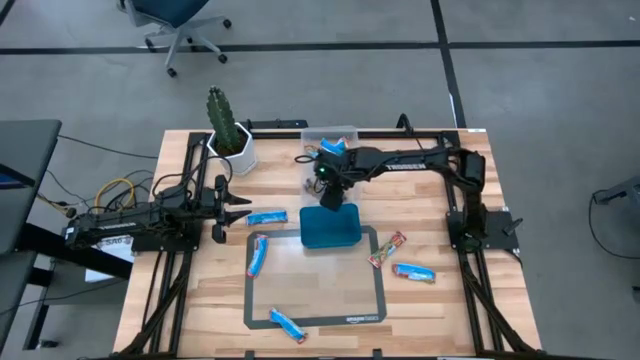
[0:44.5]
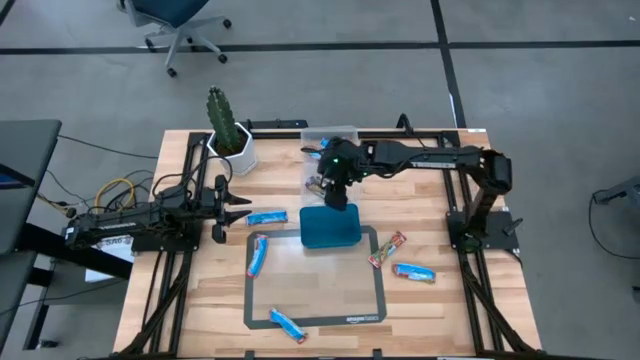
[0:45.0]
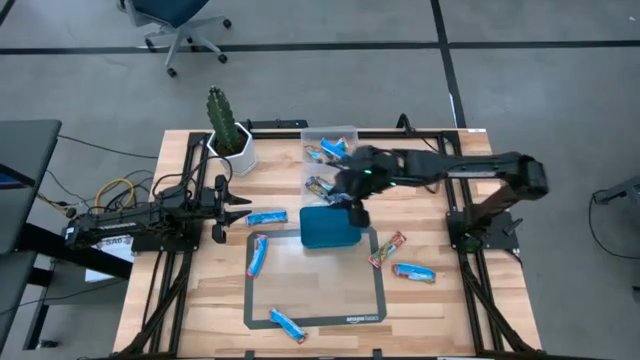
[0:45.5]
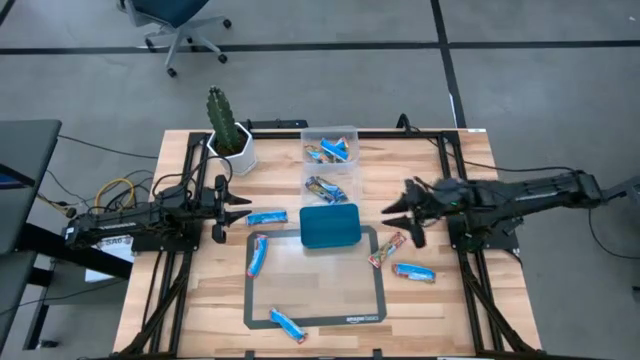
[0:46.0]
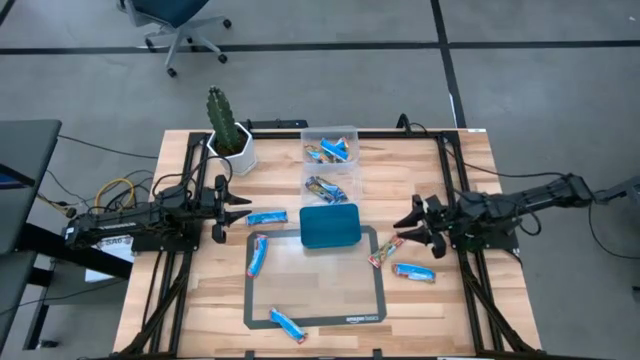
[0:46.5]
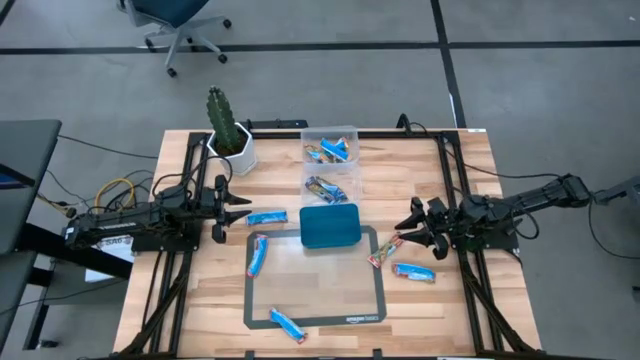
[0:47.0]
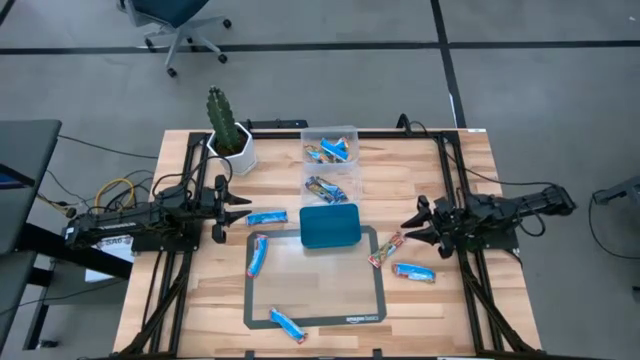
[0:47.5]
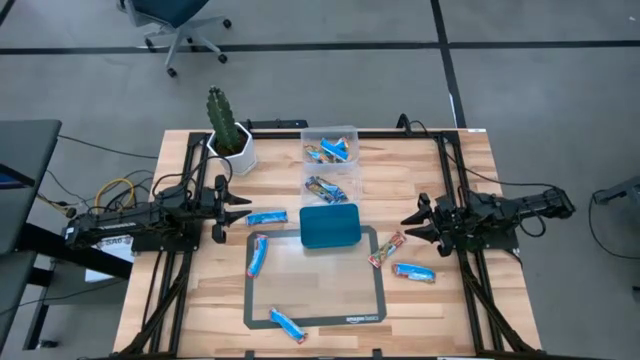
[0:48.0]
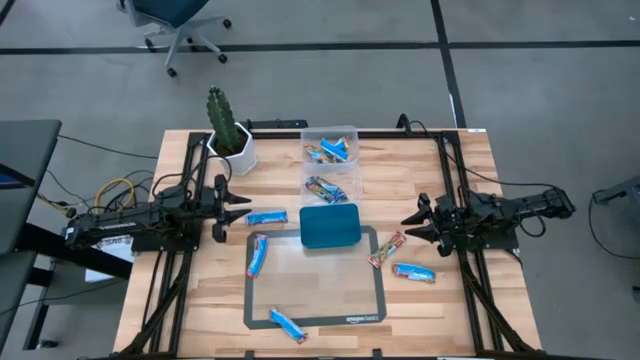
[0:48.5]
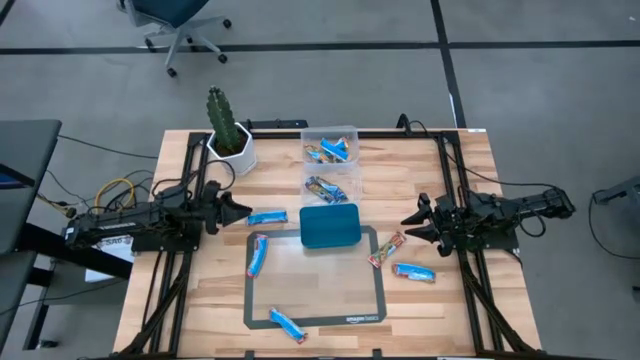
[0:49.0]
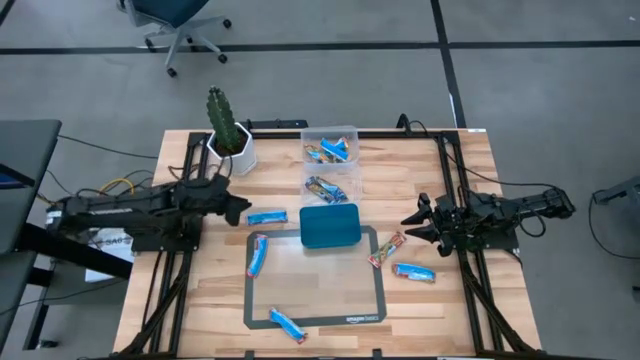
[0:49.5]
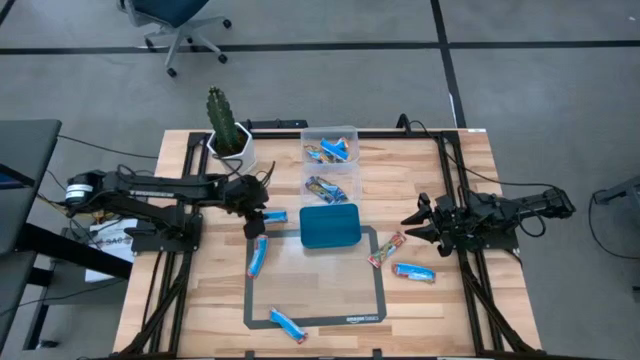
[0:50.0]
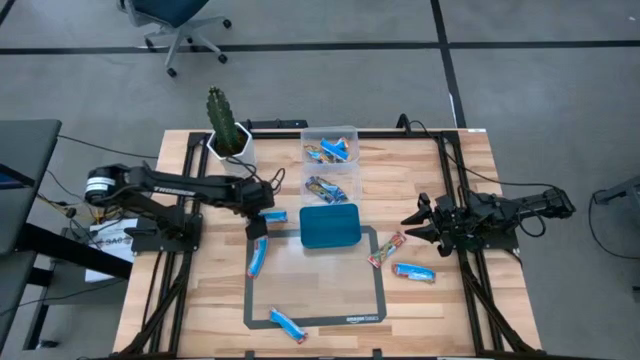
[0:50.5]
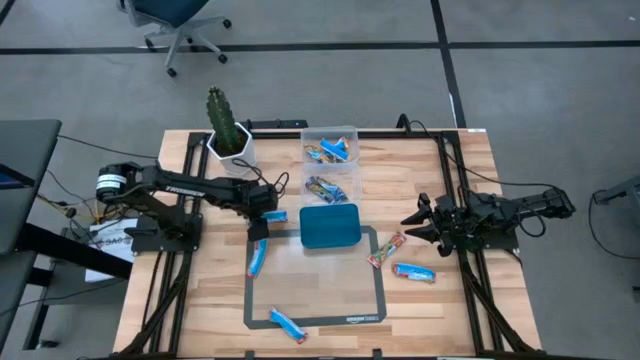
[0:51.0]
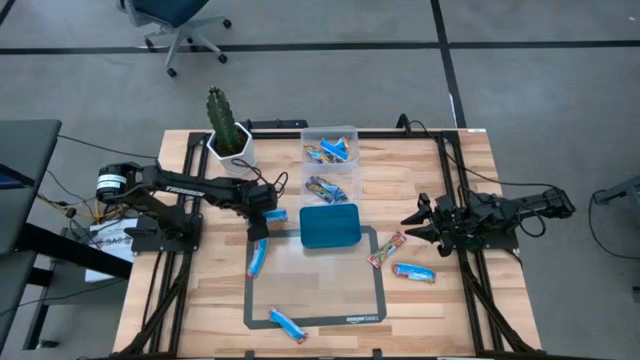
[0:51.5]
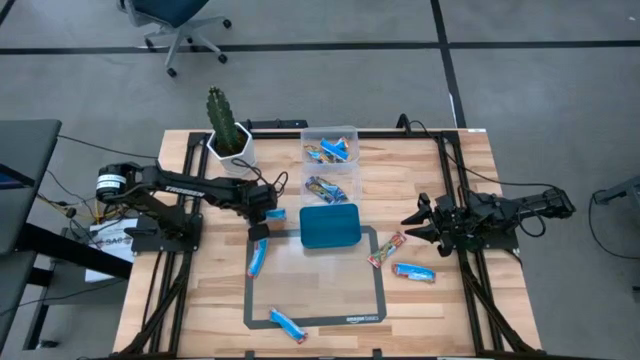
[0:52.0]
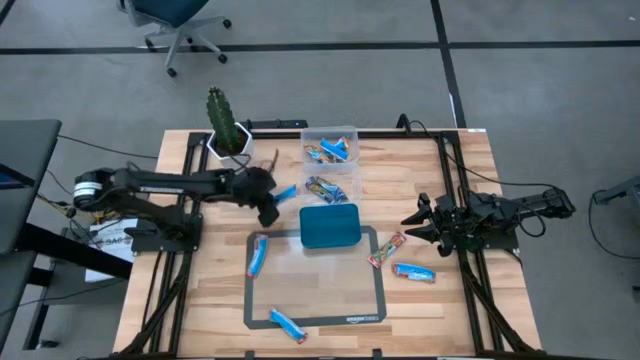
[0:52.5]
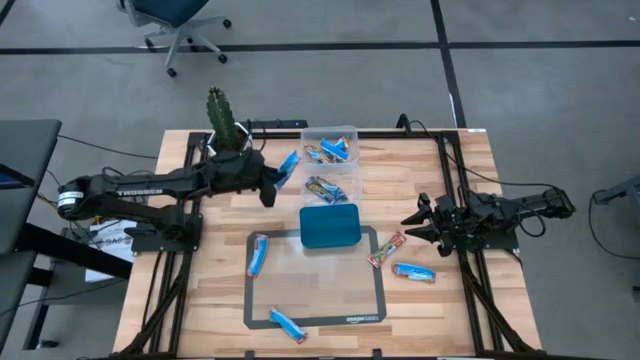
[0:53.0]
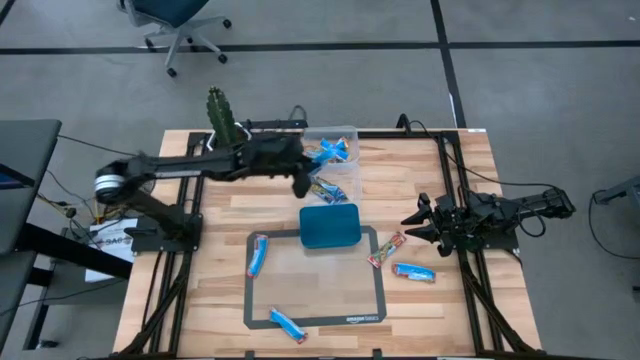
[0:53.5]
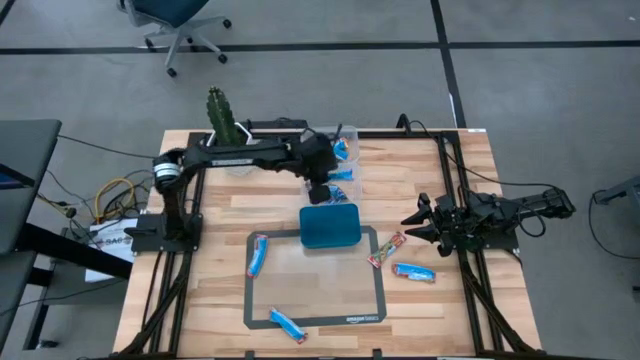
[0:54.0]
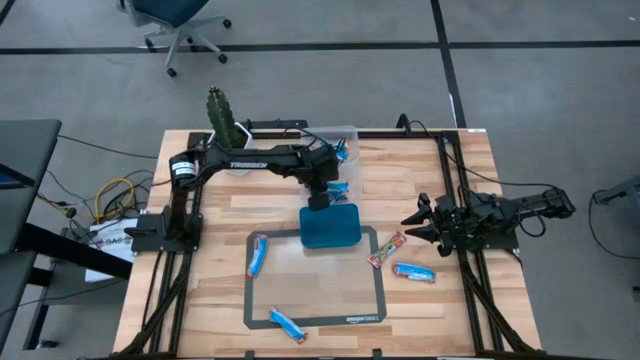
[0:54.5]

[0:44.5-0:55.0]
Task: Pick and place Granola Bars by type
Put the blue granola bar into the bottom transparent bin

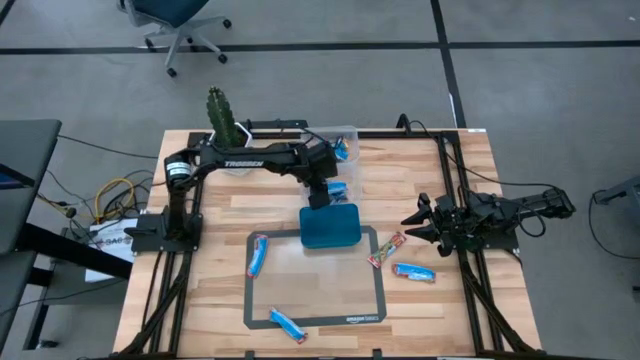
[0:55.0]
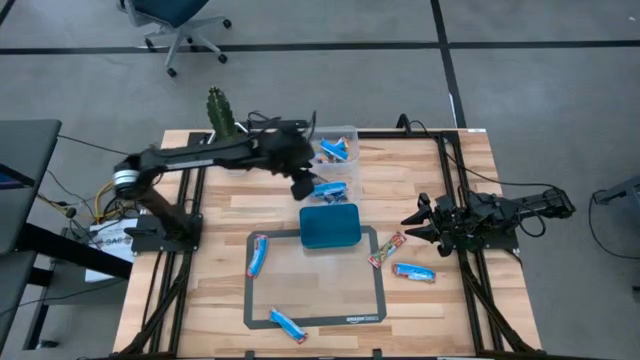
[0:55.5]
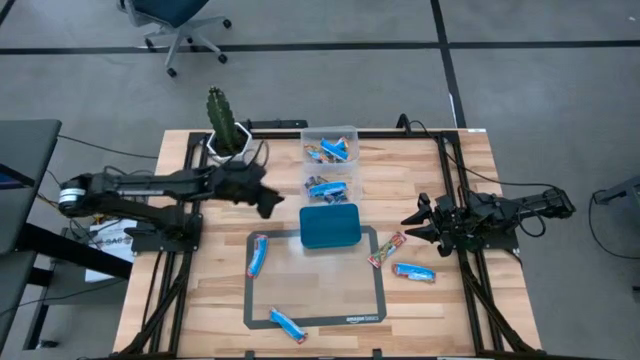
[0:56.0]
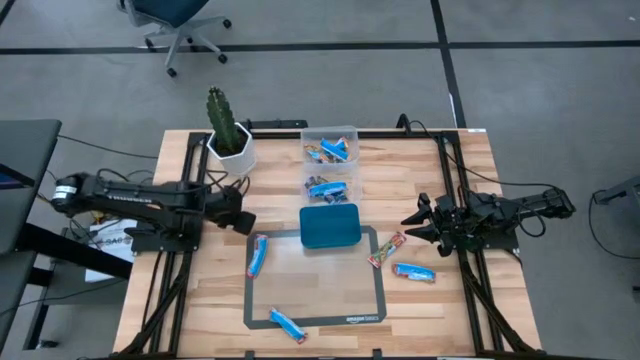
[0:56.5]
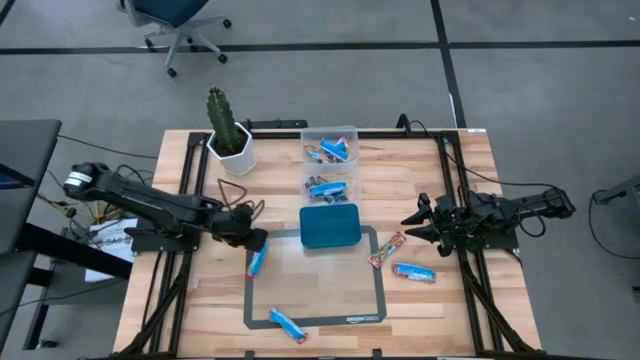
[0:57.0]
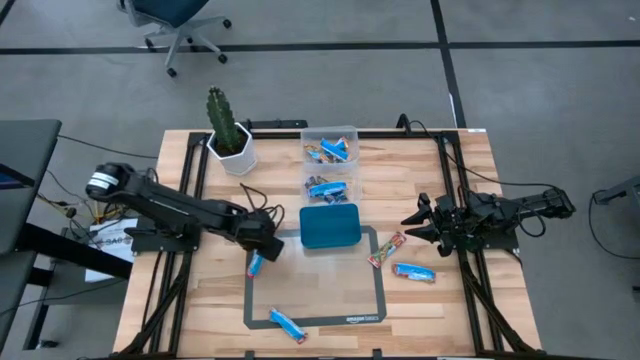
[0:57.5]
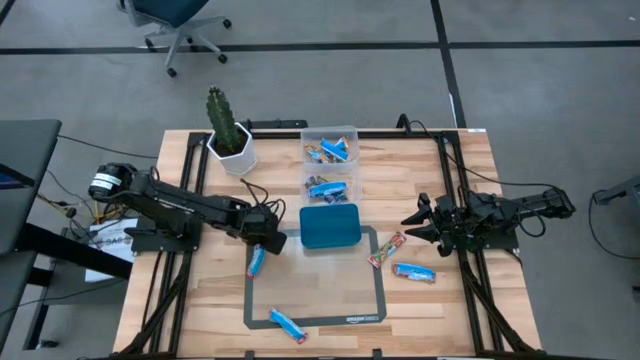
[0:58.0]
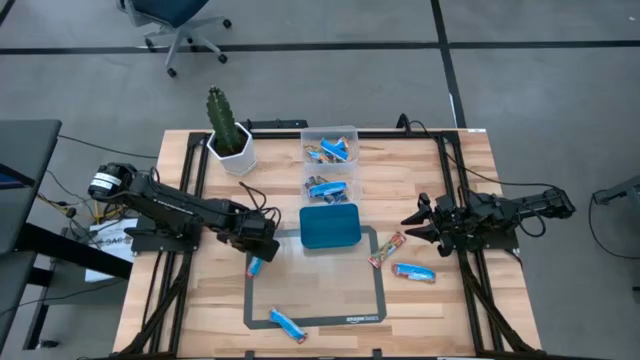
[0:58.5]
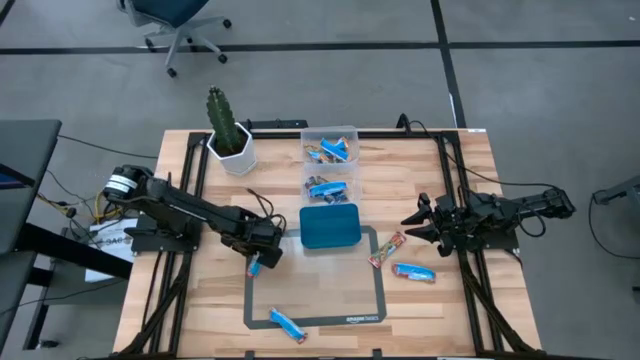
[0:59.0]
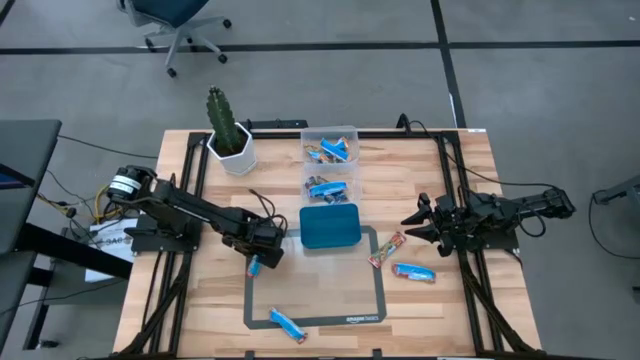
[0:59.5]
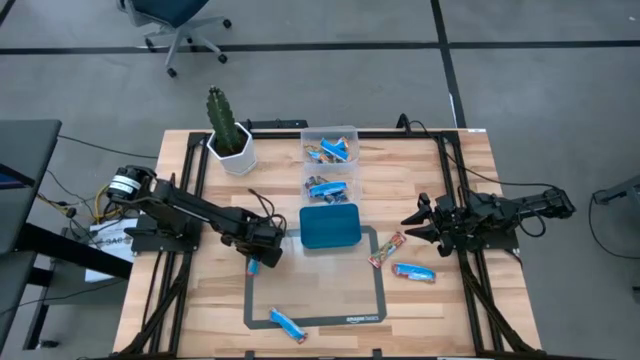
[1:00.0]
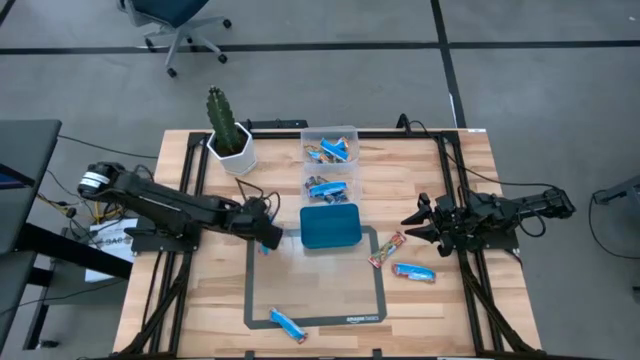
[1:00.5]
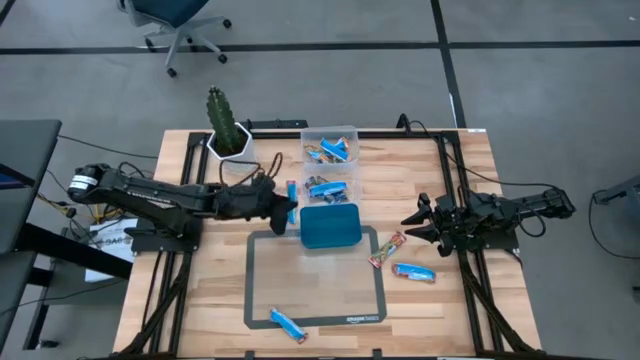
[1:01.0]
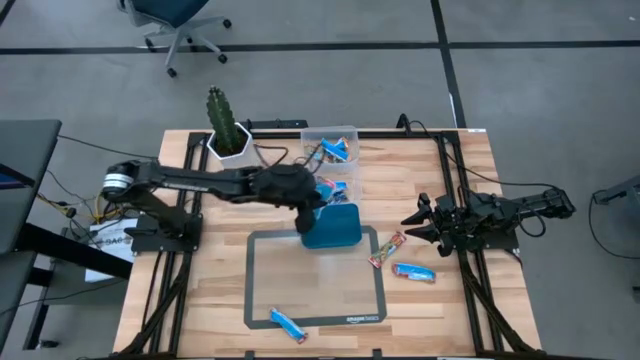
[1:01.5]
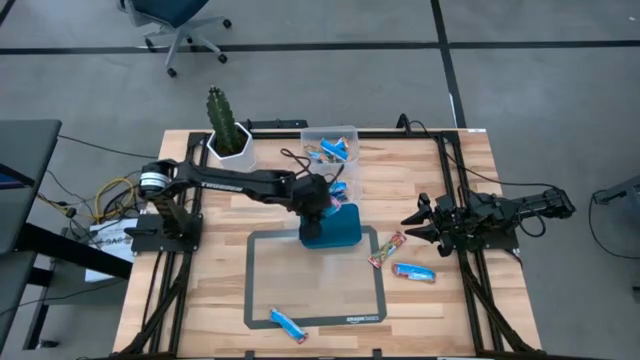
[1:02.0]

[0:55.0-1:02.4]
Put the red granola bar into the blue bin

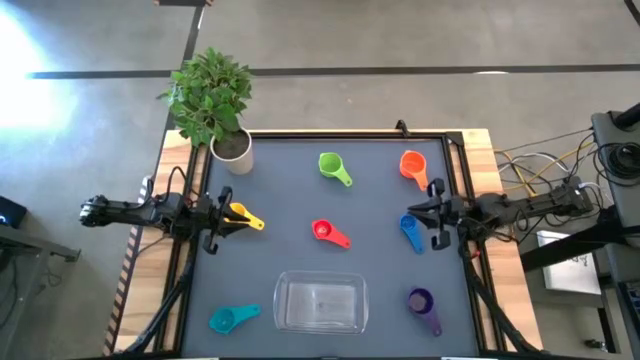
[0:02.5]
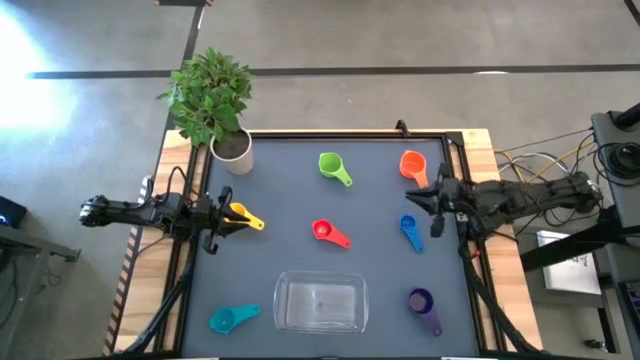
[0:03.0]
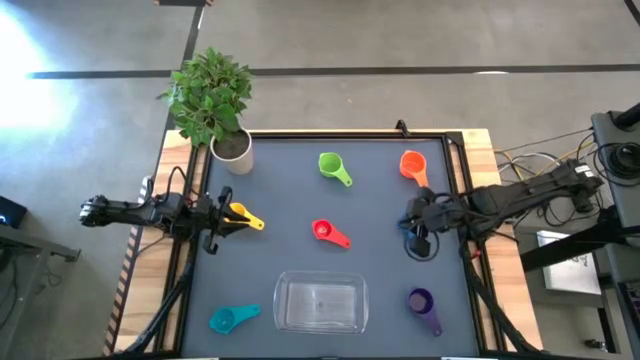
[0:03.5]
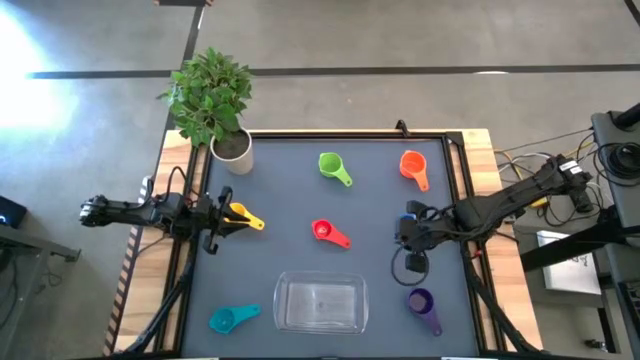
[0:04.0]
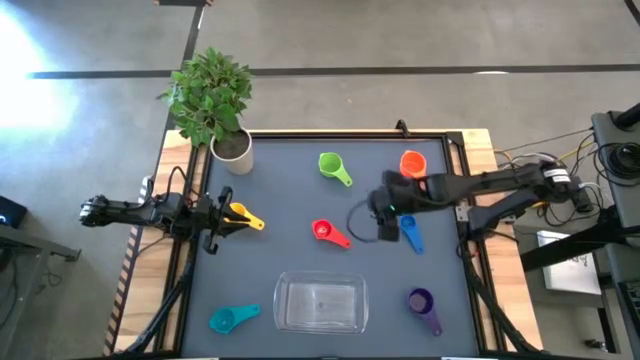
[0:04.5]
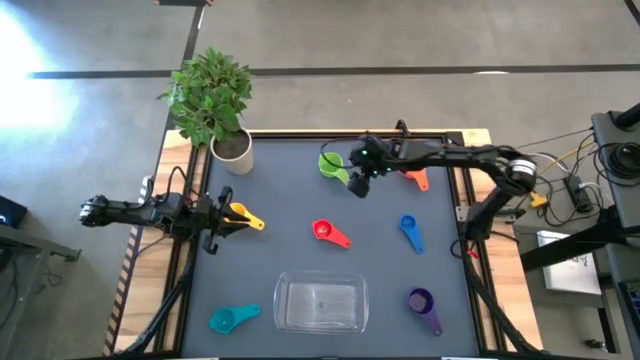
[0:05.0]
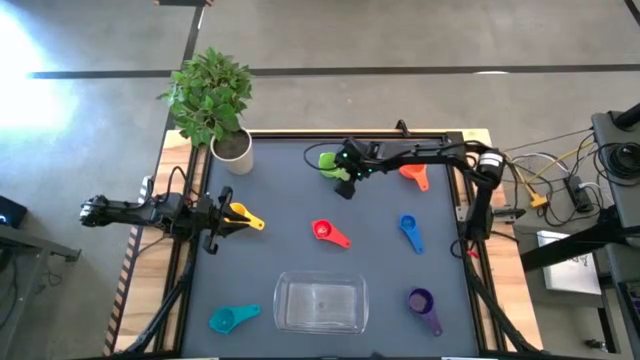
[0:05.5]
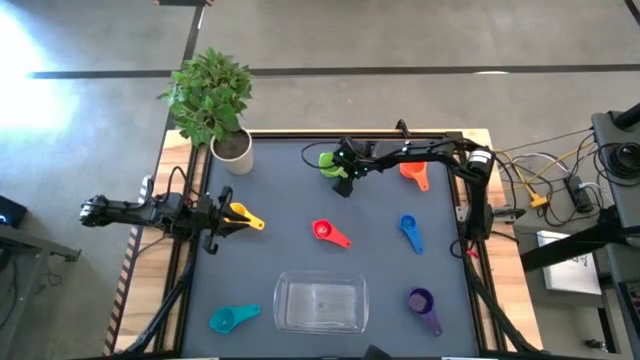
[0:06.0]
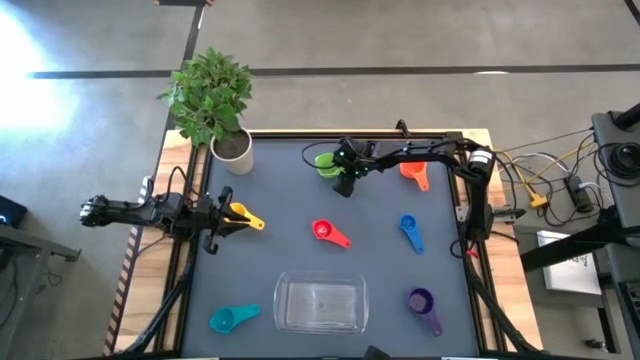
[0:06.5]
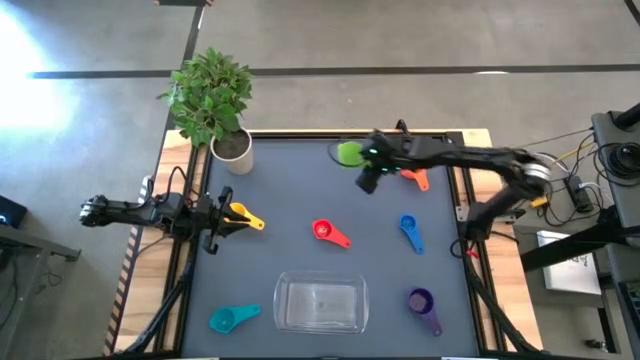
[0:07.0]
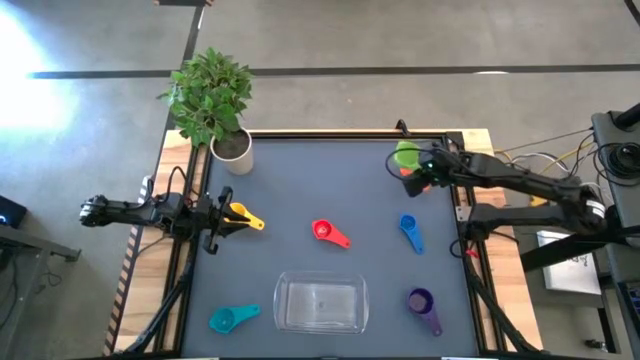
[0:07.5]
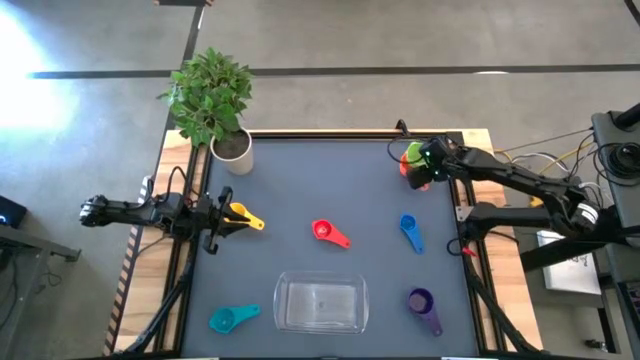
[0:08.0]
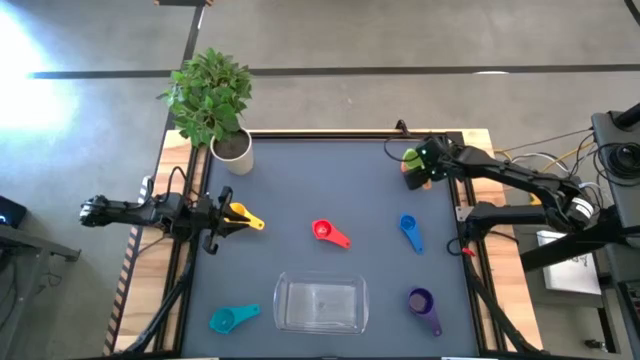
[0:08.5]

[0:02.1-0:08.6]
Task: Nest measuring cups in basket
Stack the green measuring cup on top of the orange measuring cup
